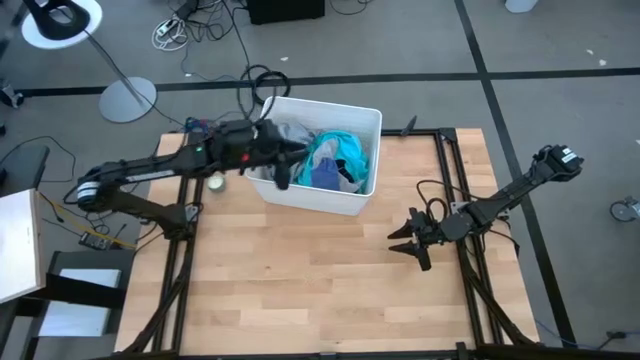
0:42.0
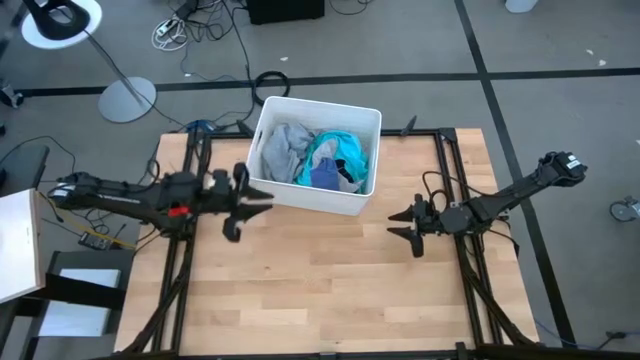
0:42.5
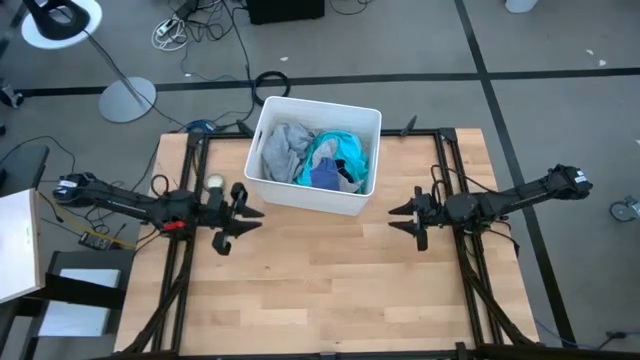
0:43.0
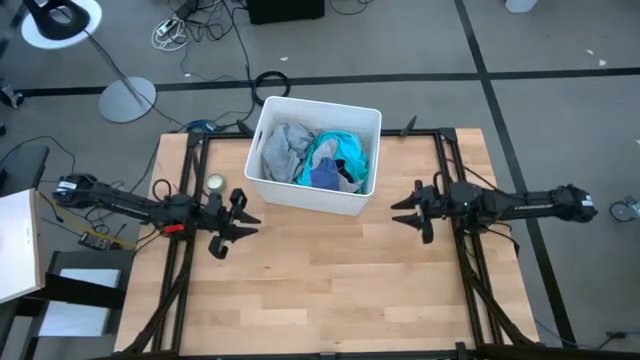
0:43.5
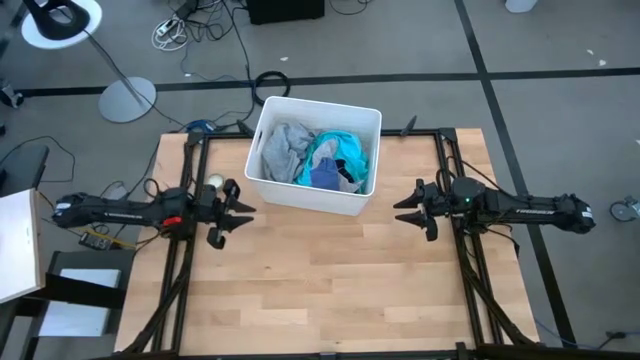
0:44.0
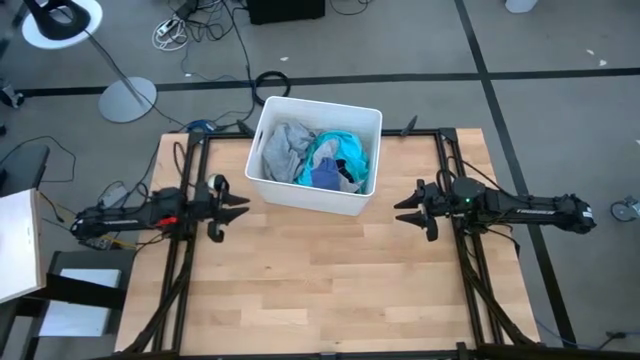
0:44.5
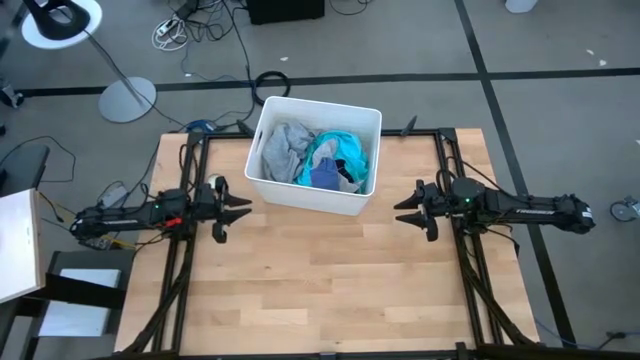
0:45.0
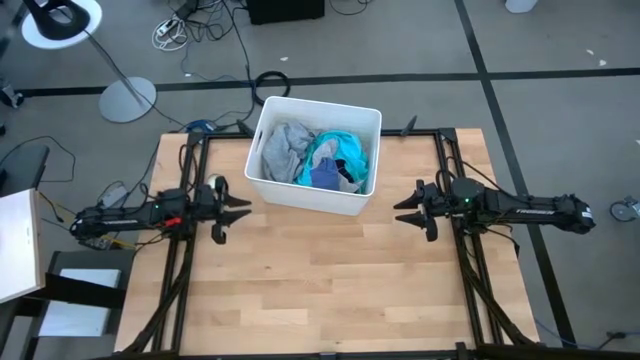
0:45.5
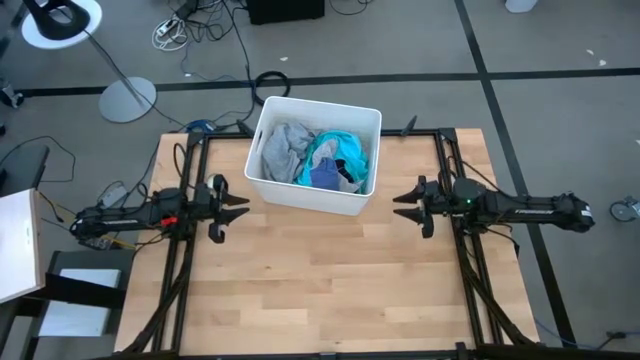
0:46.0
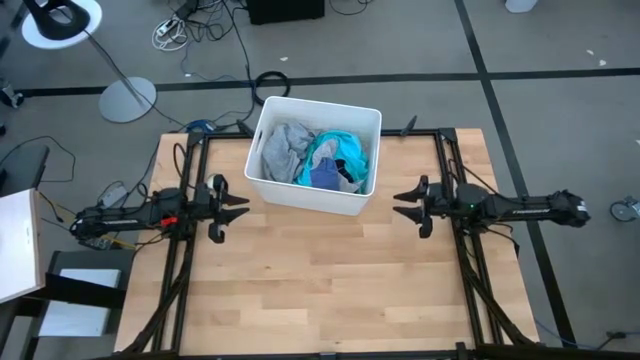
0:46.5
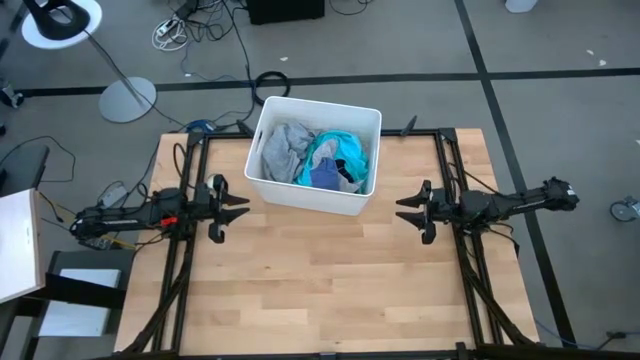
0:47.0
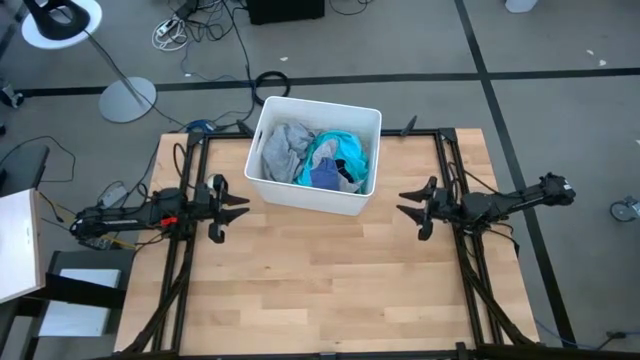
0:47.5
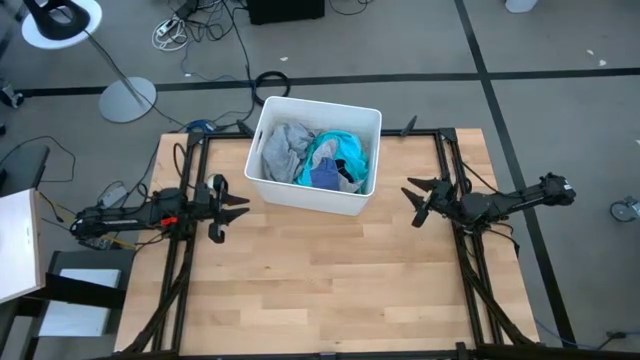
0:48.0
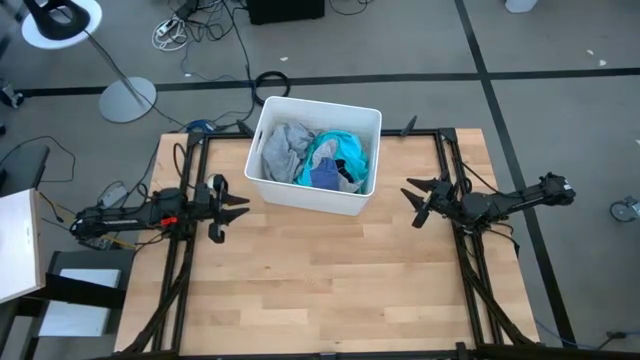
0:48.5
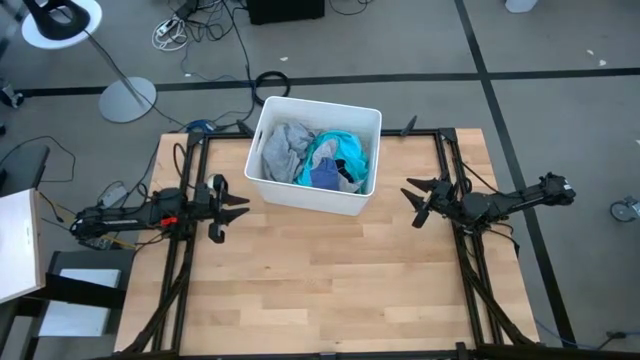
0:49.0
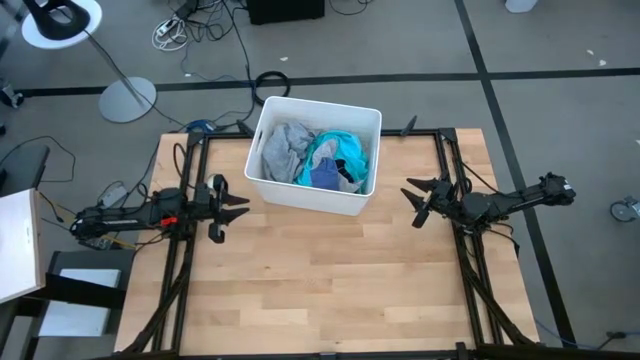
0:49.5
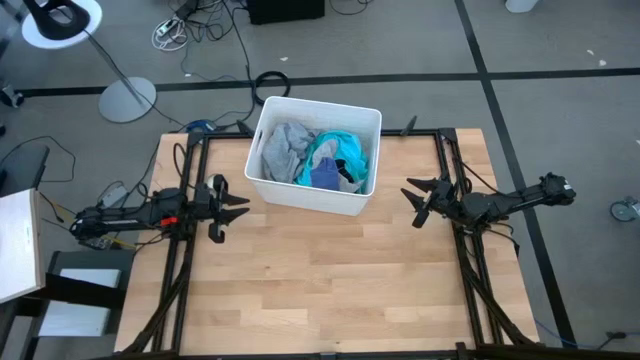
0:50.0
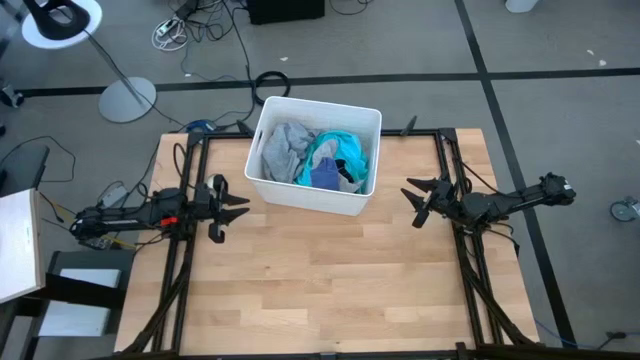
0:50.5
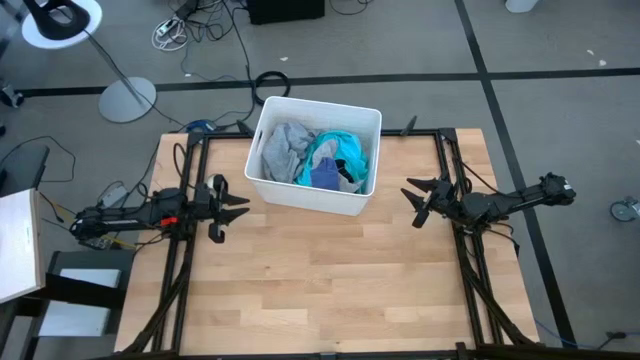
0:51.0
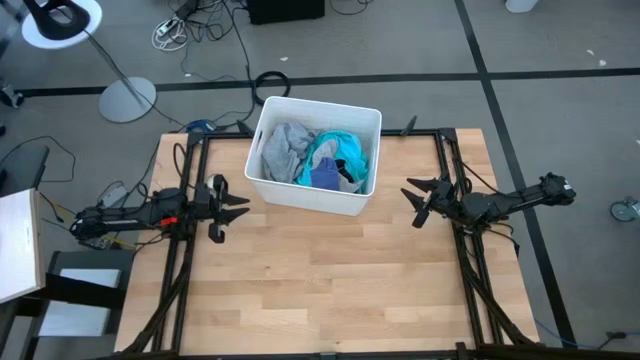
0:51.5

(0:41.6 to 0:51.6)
Task: Sort clothes
Return to Home Position

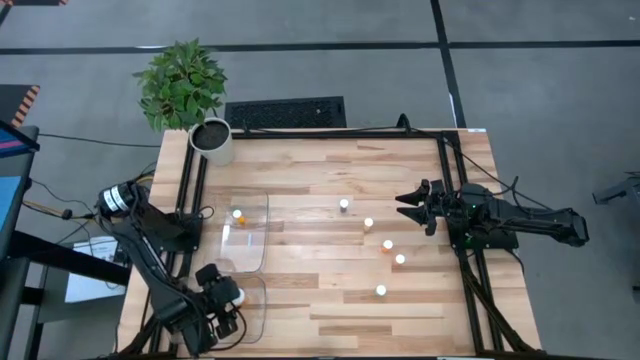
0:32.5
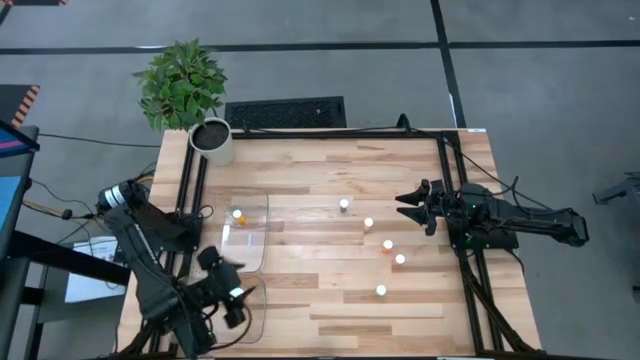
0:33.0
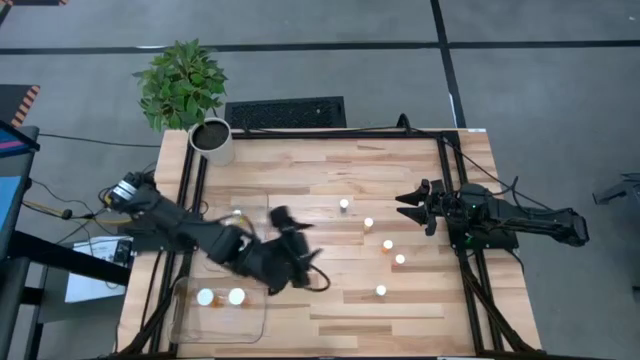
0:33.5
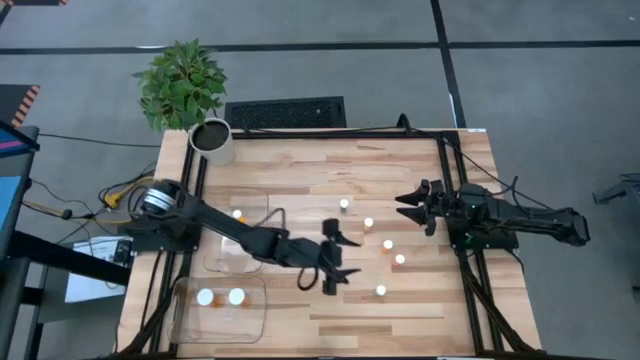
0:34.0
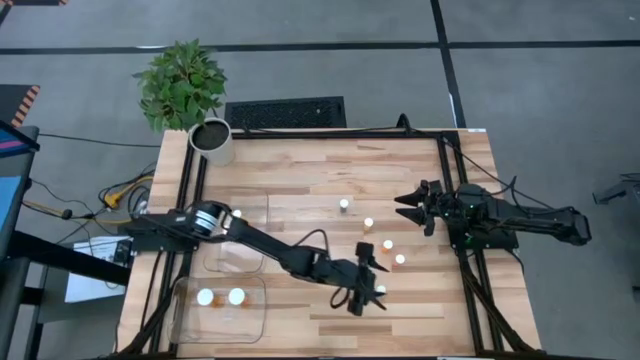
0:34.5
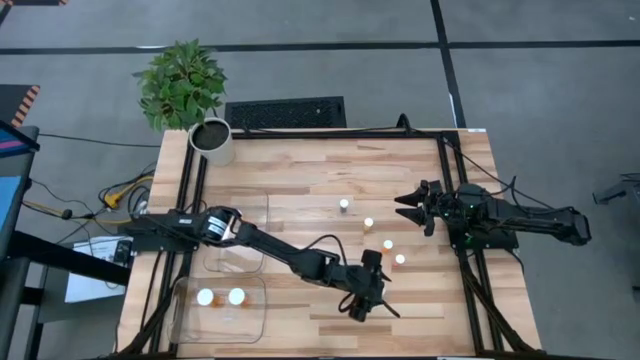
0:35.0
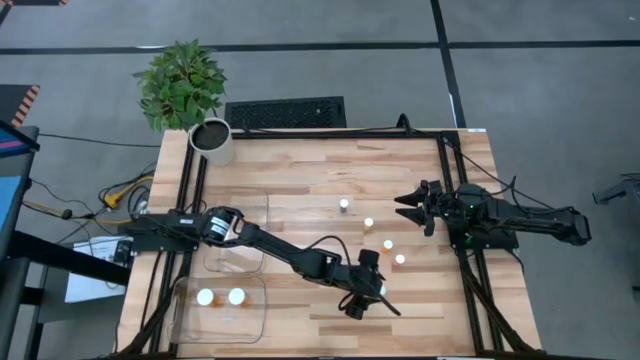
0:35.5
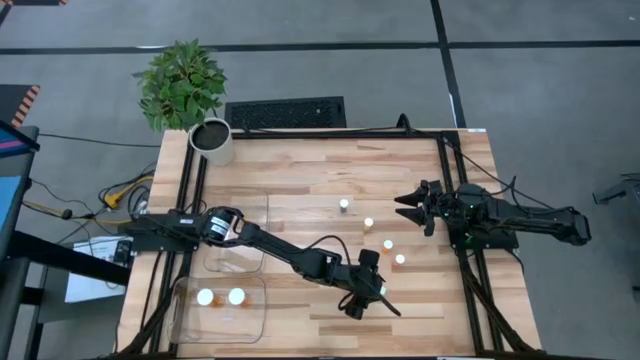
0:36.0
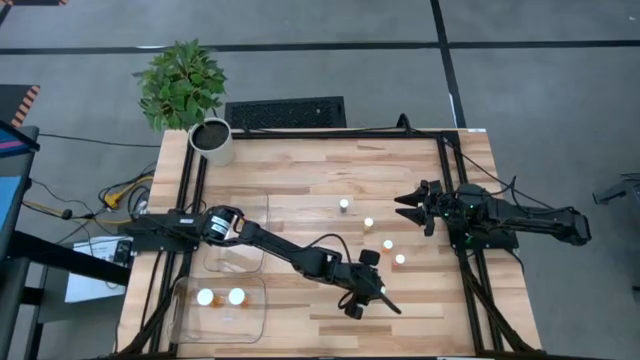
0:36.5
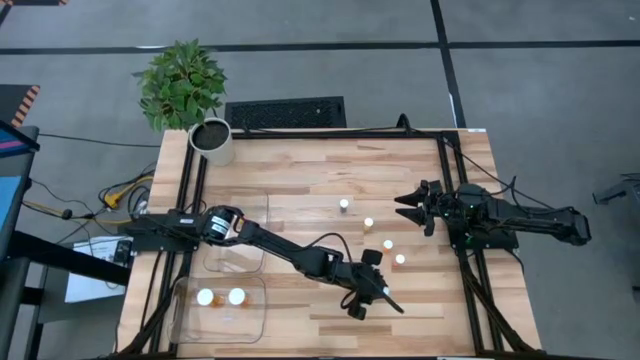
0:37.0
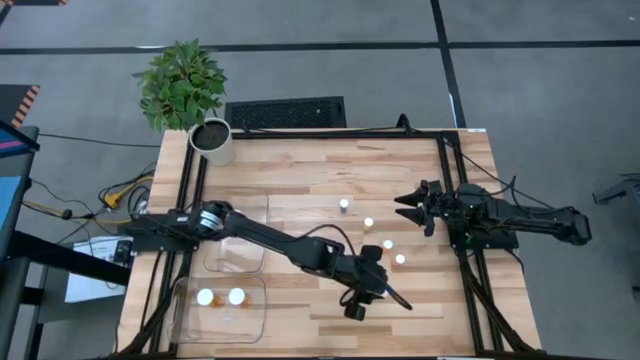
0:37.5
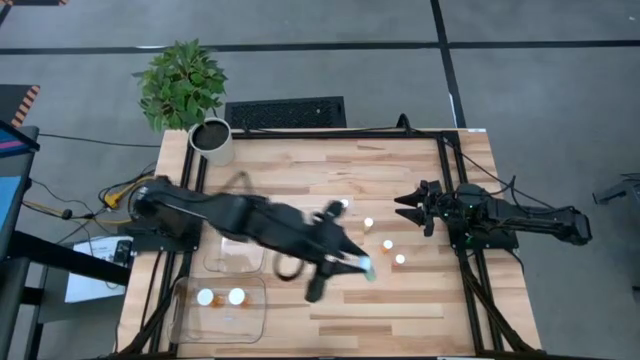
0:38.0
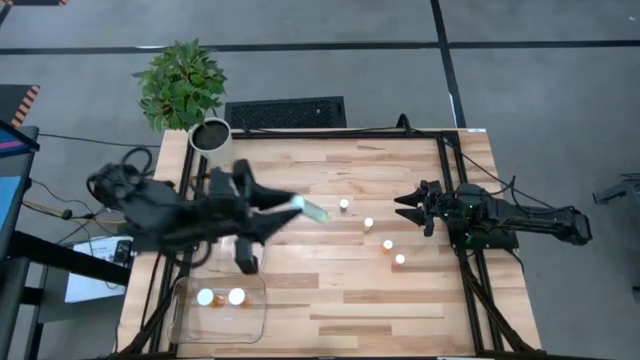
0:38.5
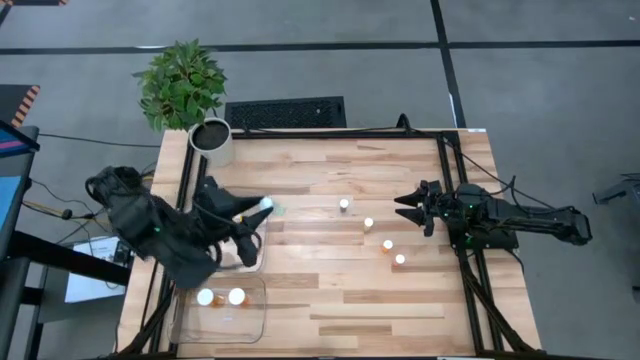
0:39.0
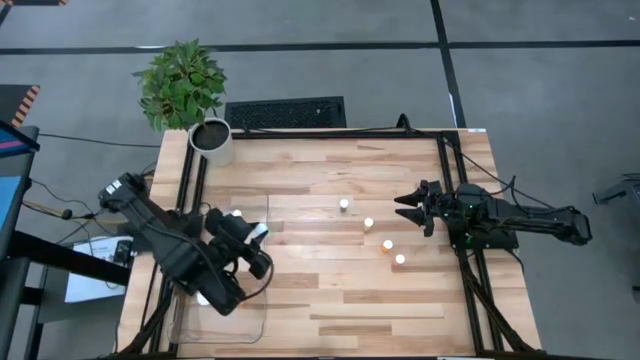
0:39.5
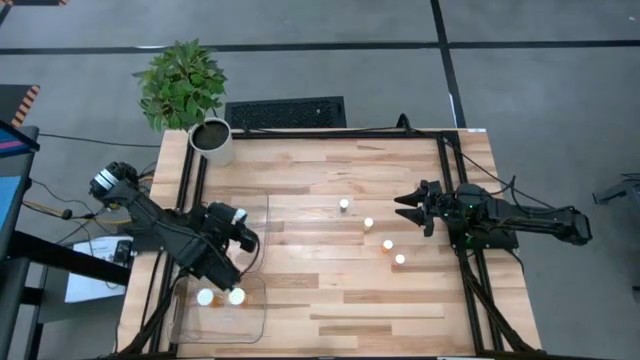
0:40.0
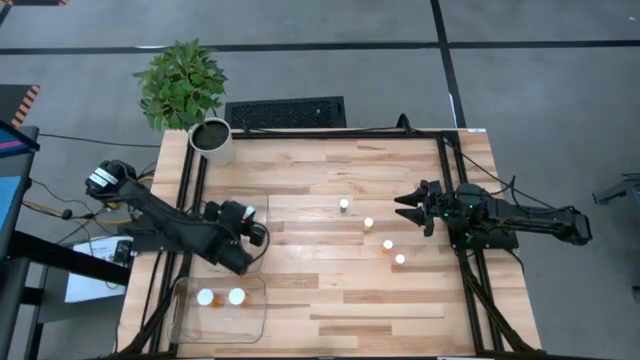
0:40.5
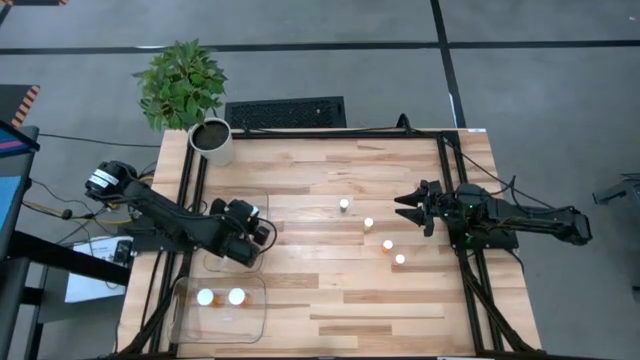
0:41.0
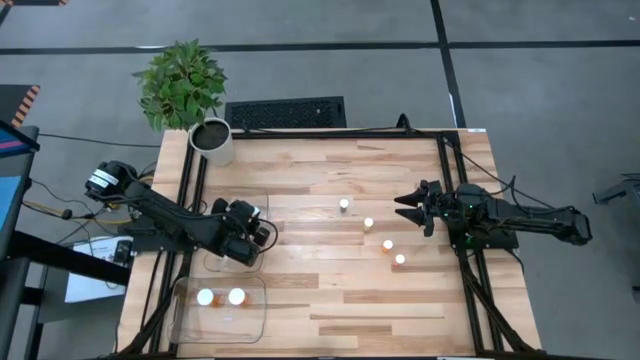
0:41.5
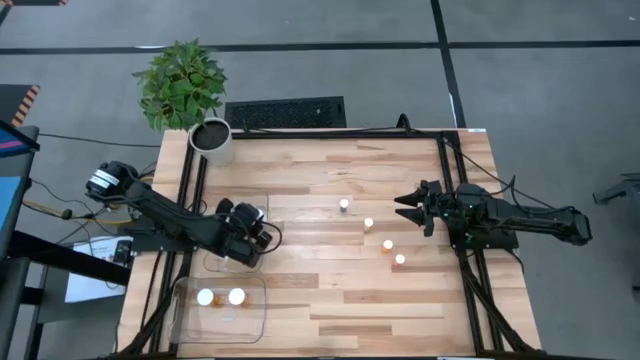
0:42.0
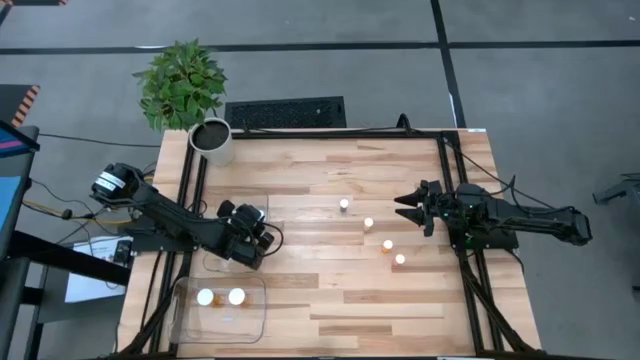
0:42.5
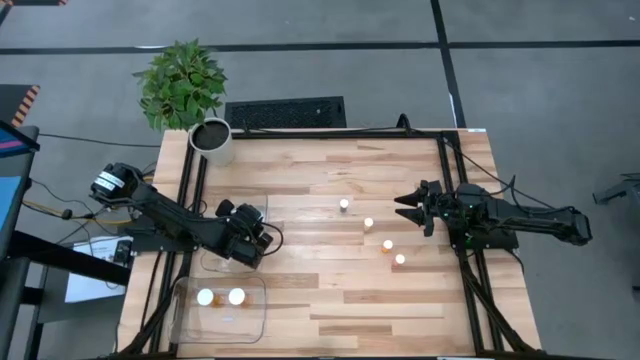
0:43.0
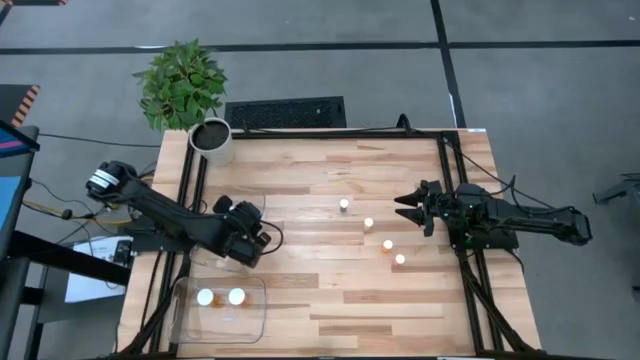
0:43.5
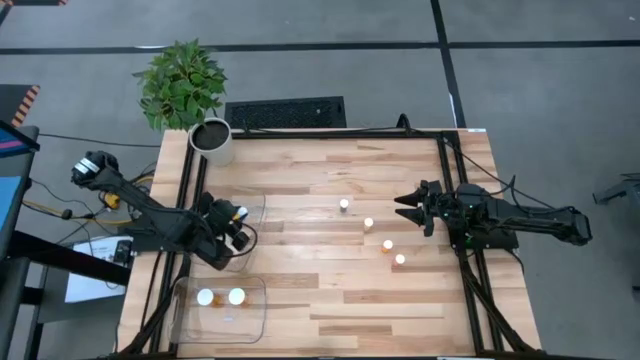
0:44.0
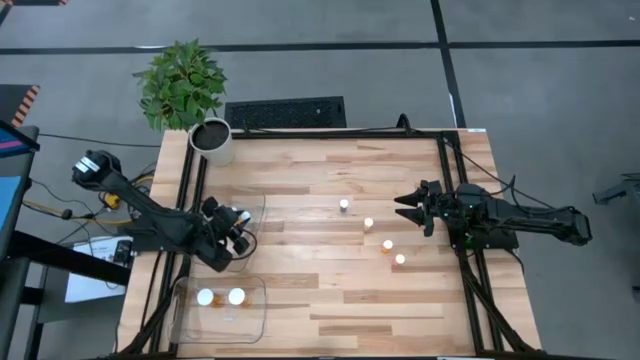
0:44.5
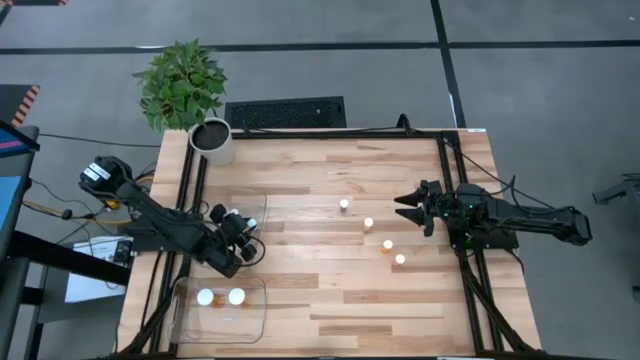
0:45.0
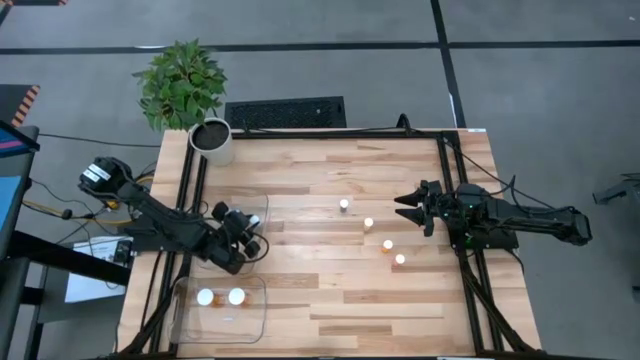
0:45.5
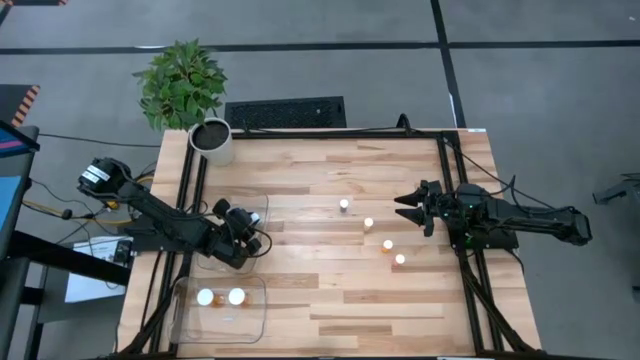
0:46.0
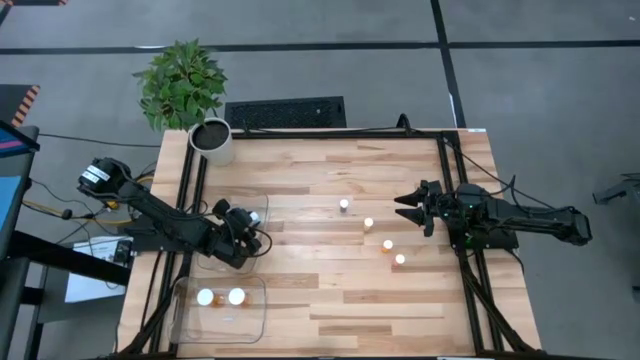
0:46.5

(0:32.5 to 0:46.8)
Task: Pick and place medicine bottles into bin by pill shape (circle, oval)
Put the green tablet bottle into the top transparent bin
